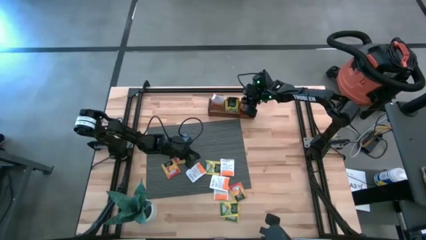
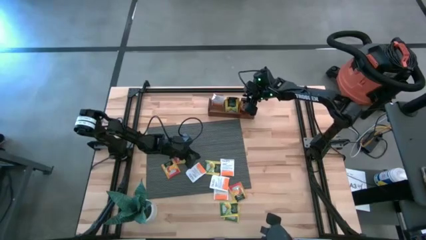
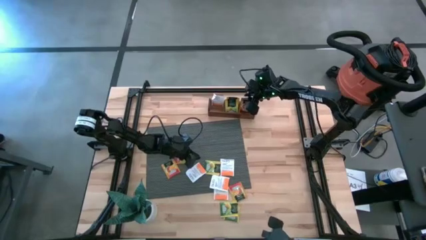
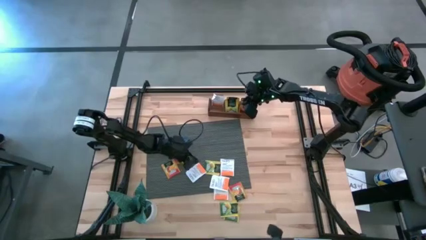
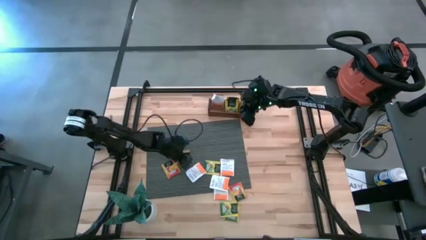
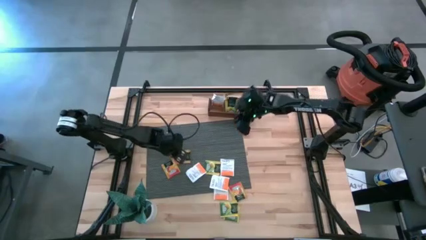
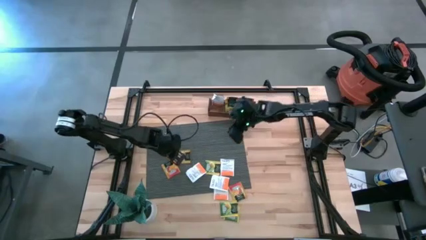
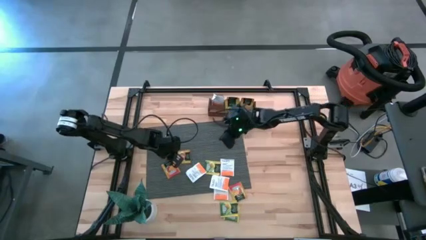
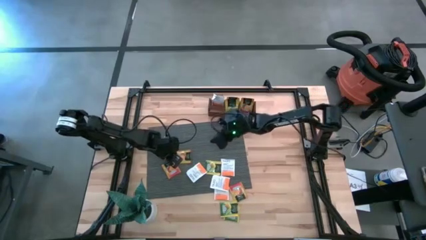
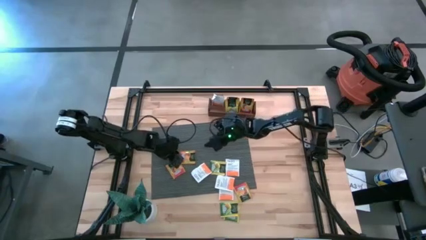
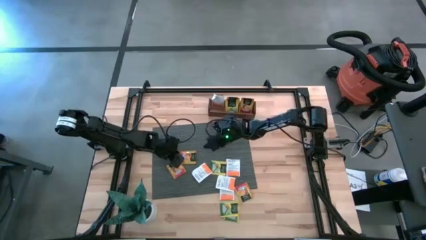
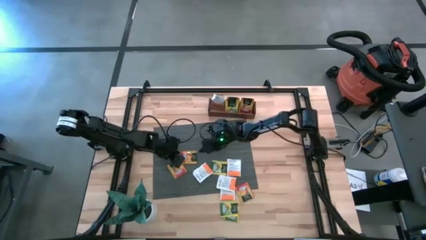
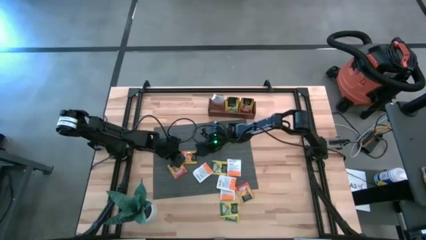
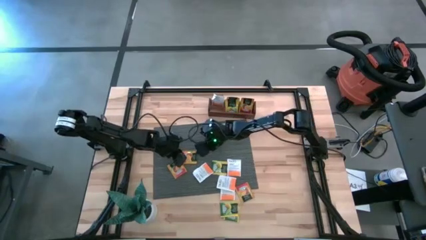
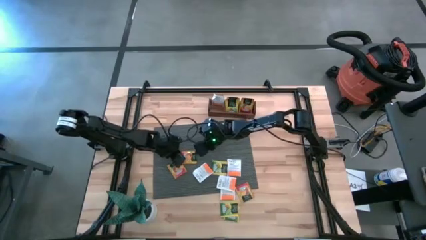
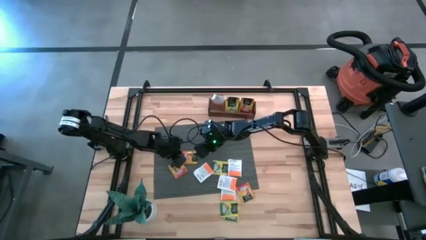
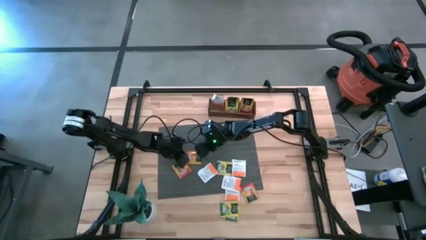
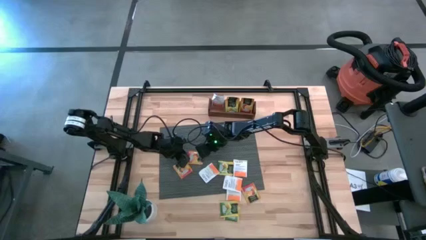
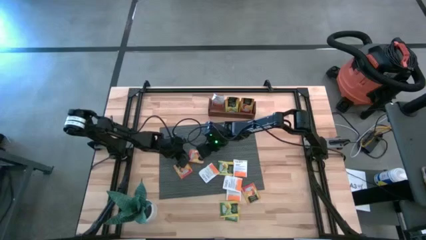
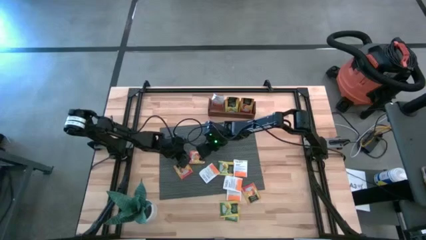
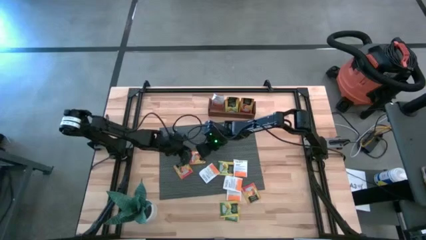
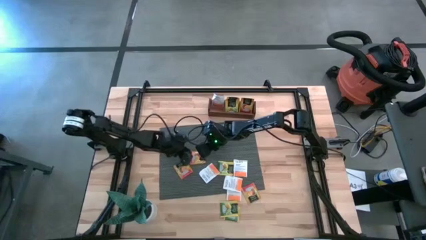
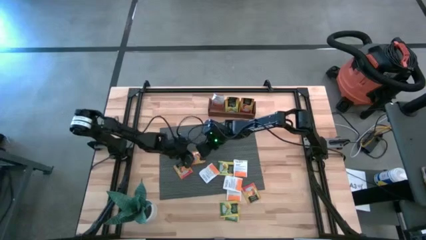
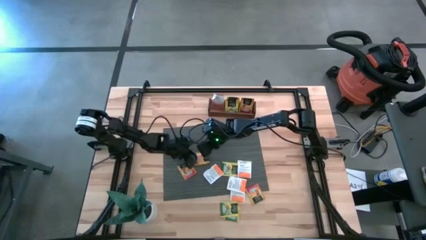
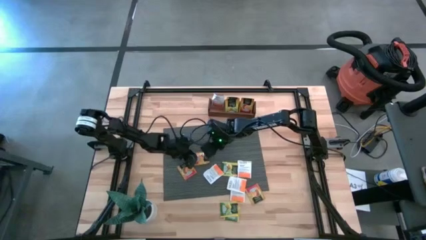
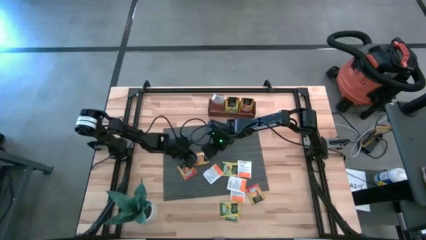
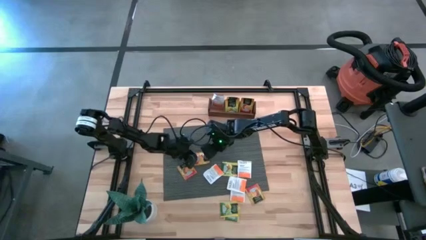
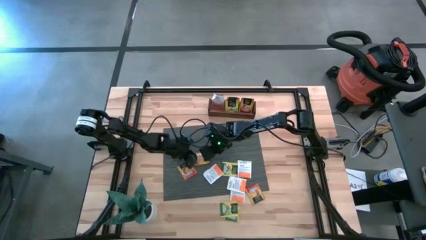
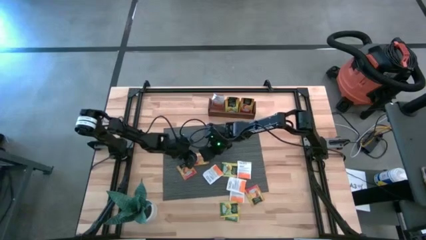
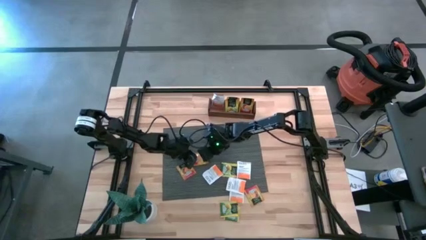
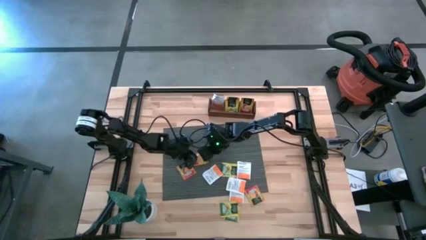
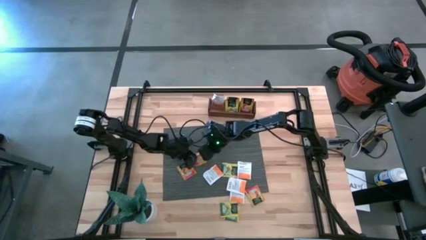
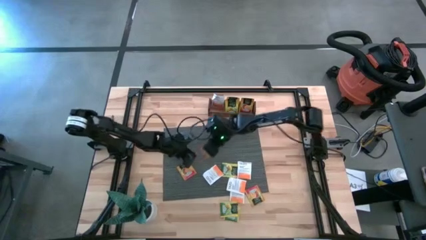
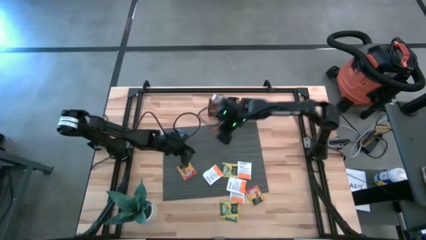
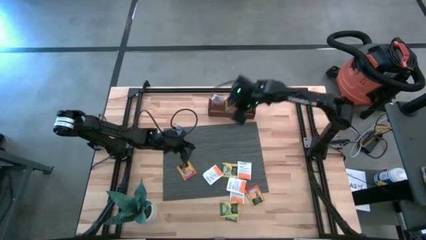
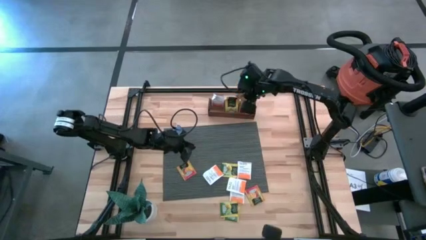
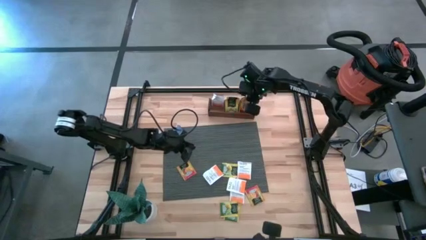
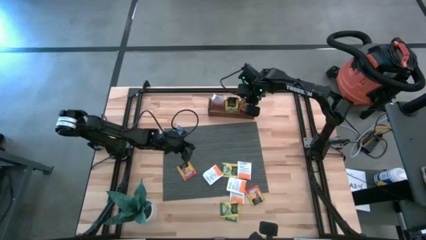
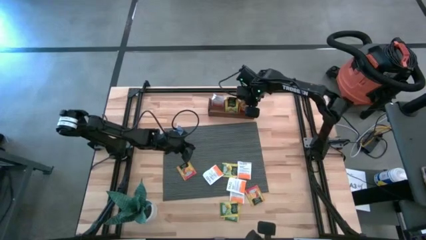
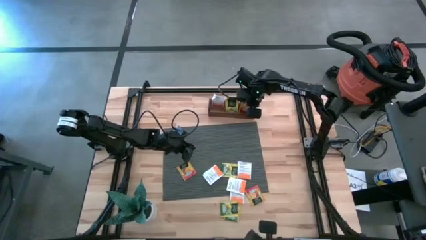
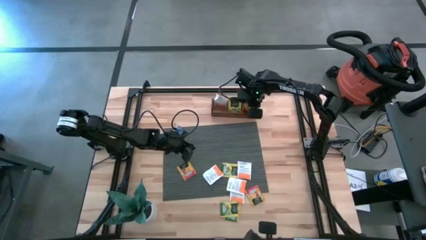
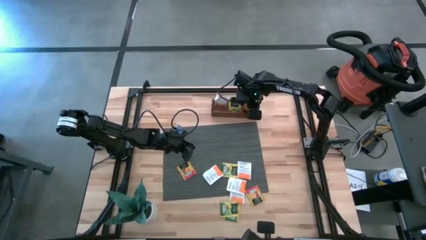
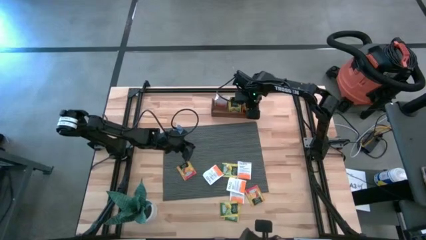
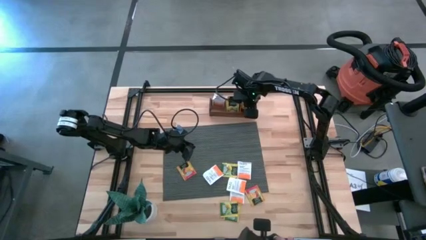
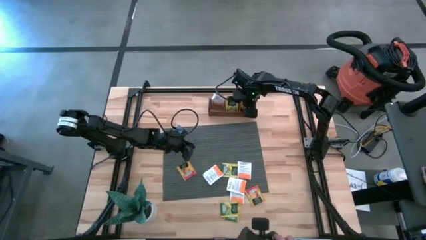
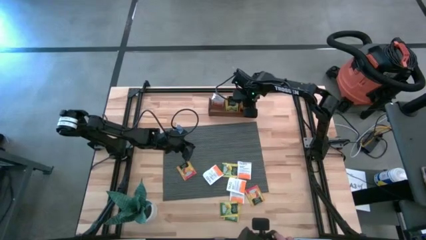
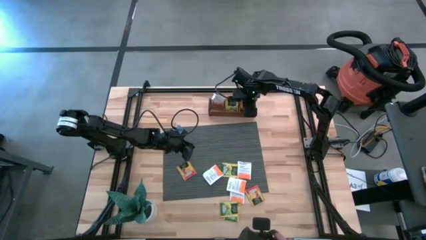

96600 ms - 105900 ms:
Task: Pick & Place Tea
Put the orange tea bag into the right section of the wooden organizer

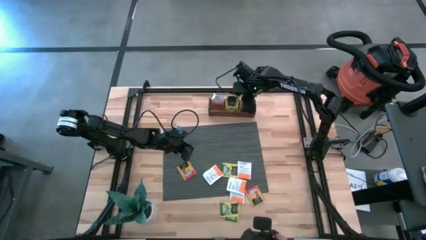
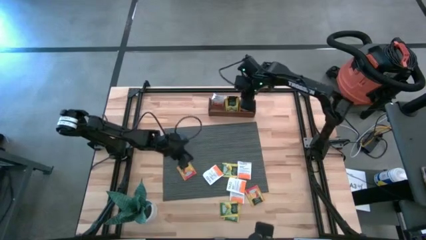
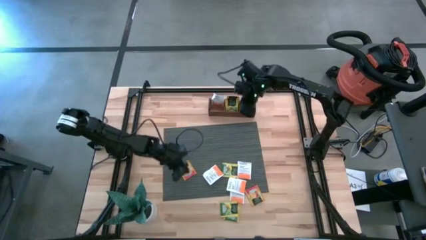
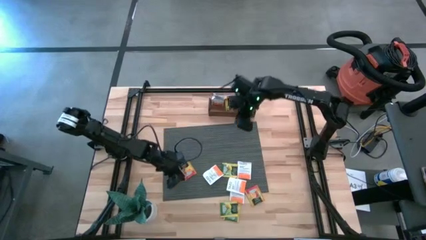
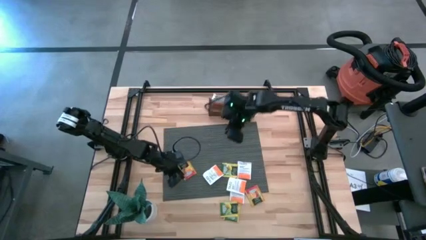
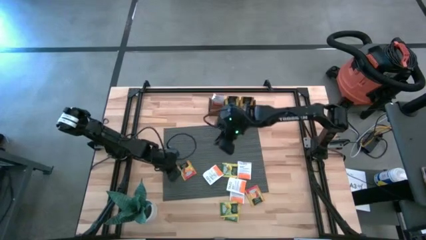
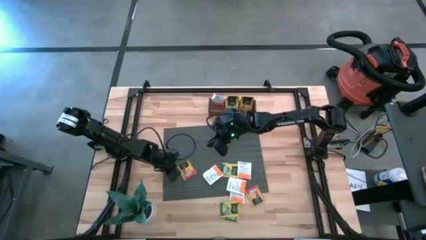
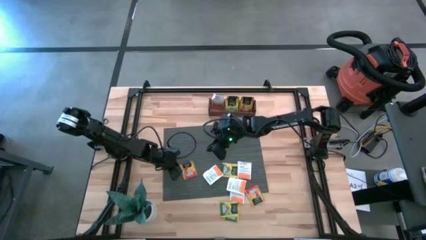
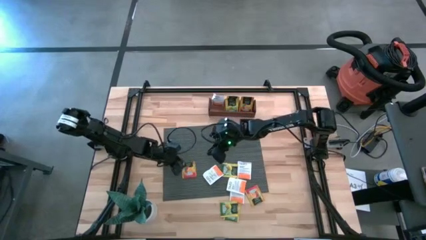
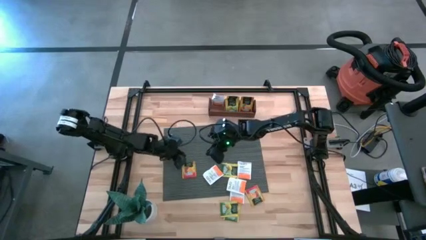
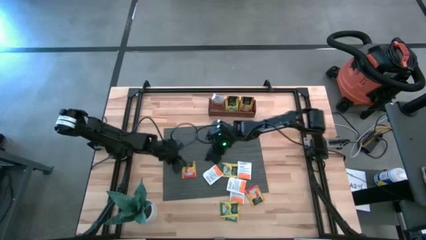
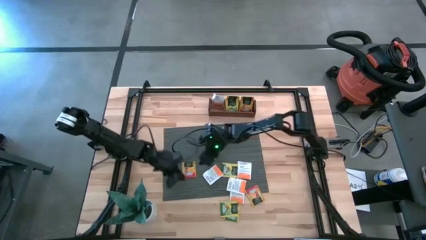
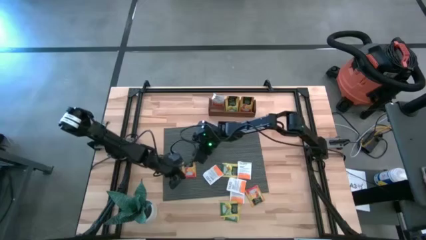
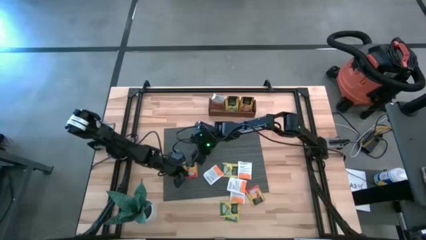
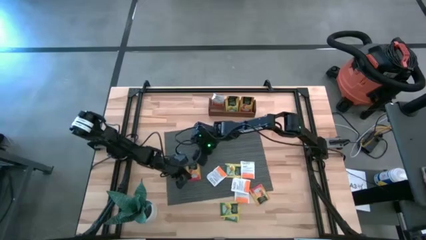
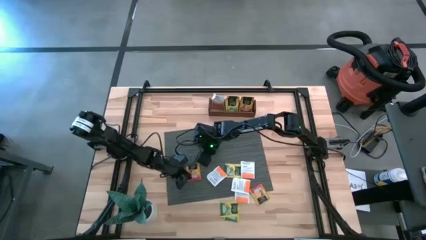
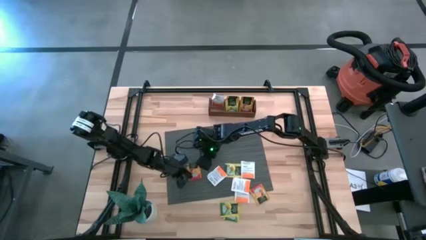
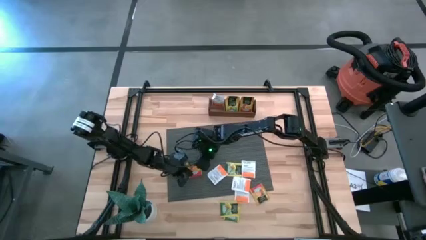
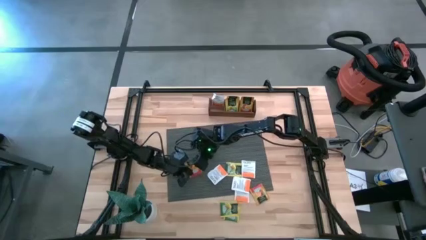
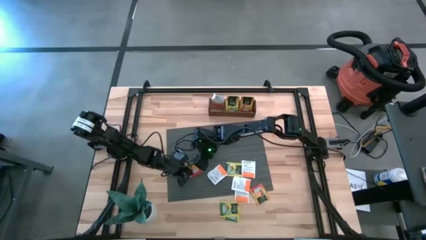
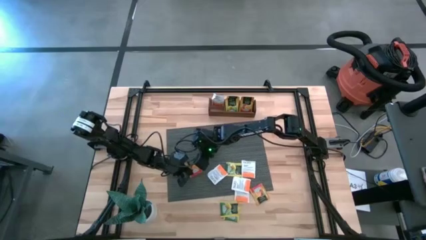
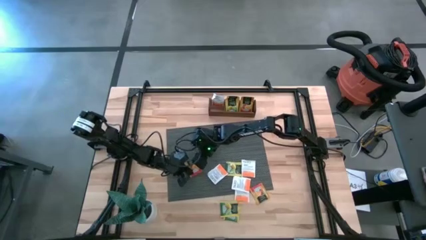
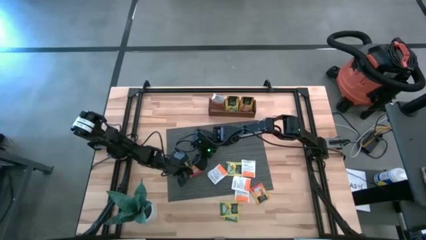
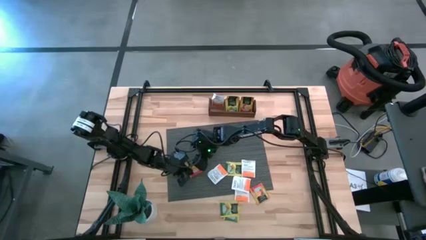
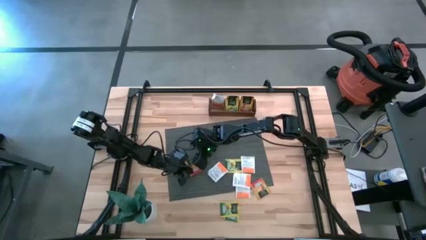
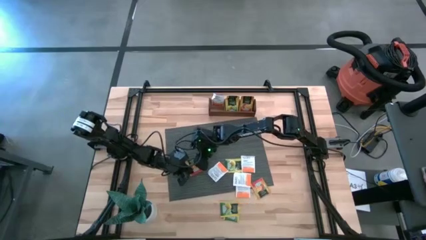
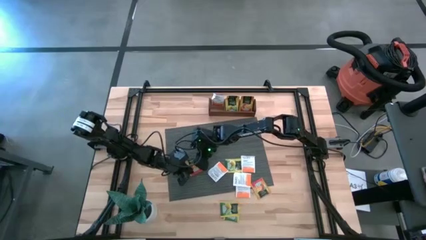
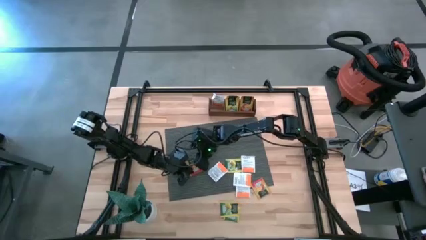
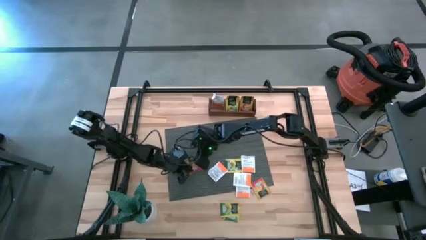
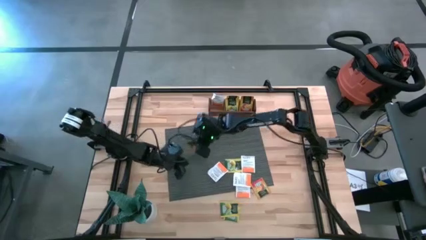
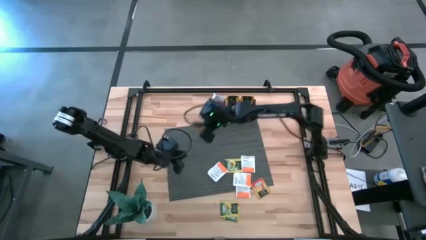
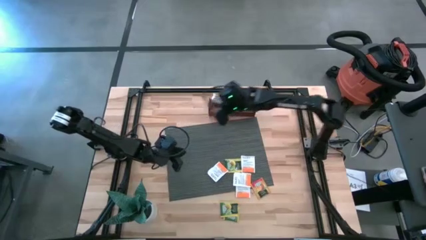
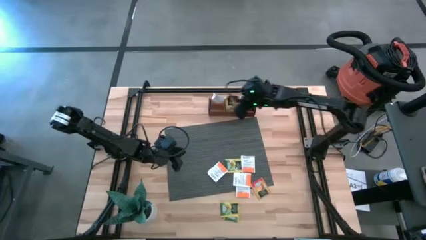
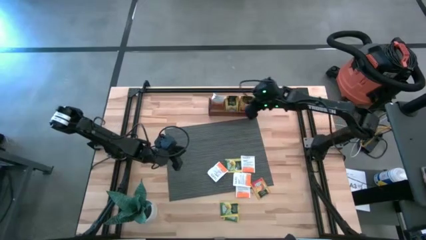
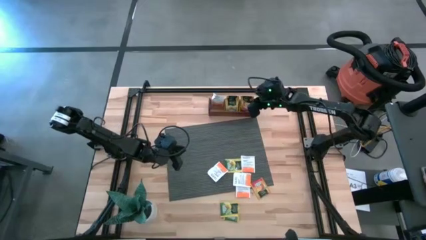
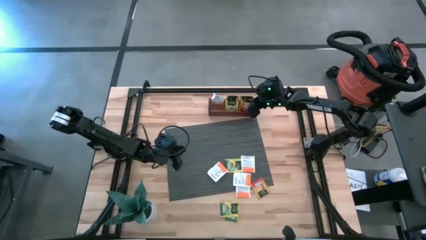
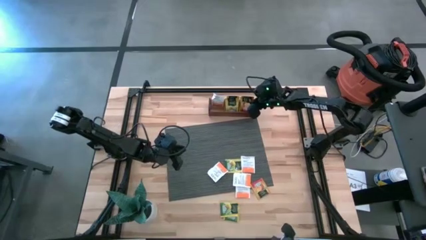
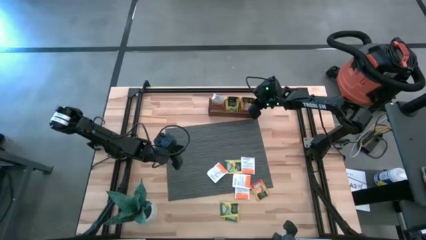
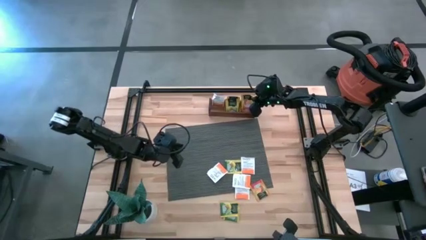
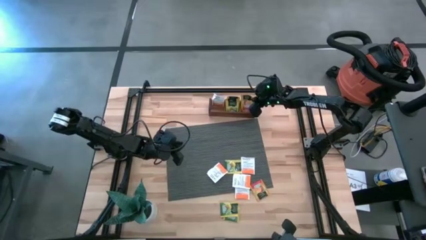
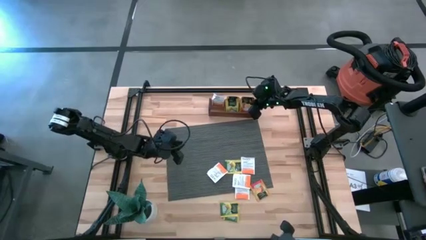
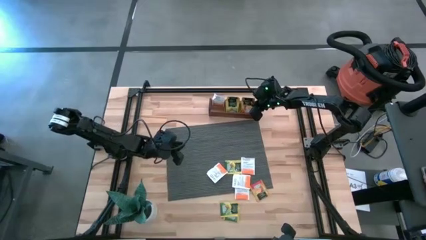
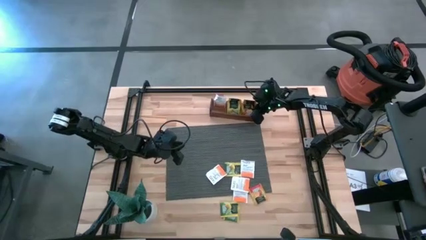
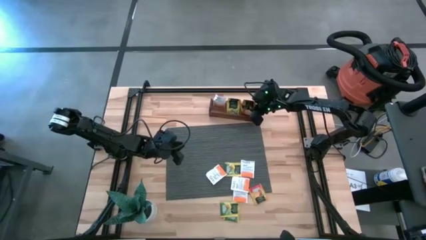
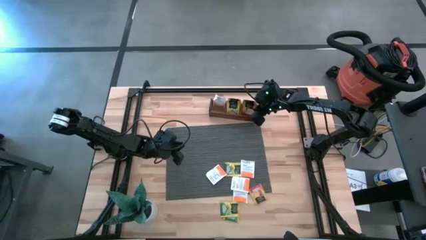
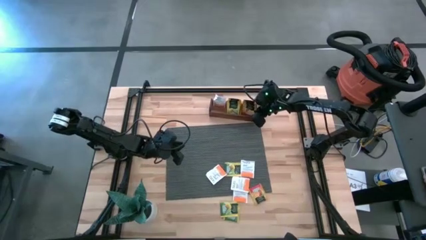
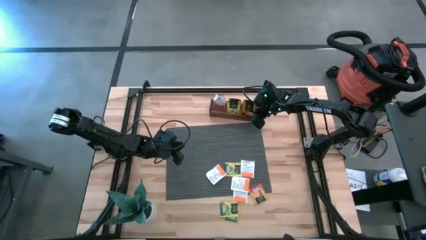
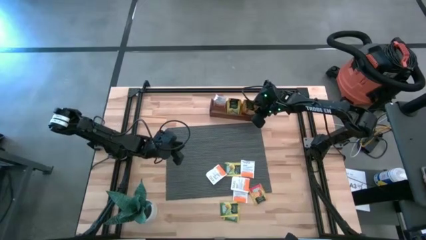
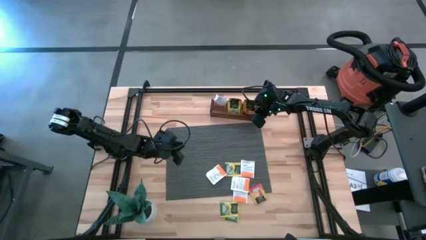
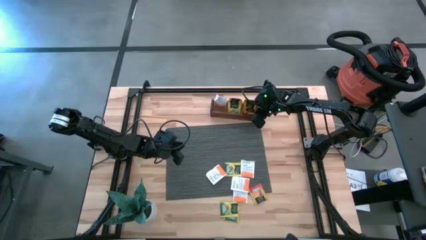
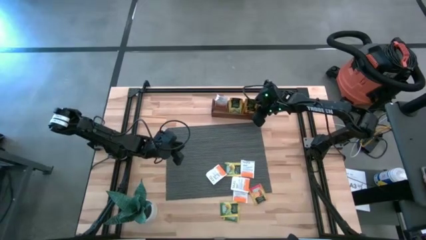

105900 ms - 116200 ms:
Put the orange tea bag into the right section of the wooden organizer
